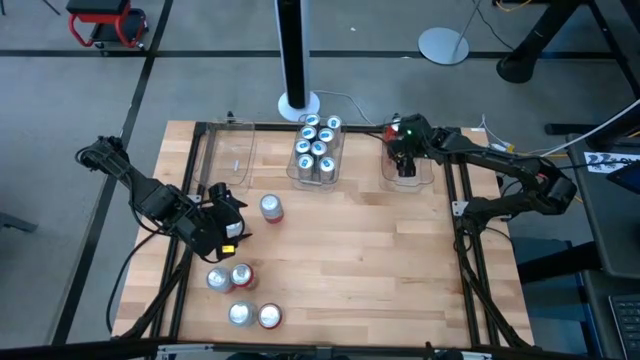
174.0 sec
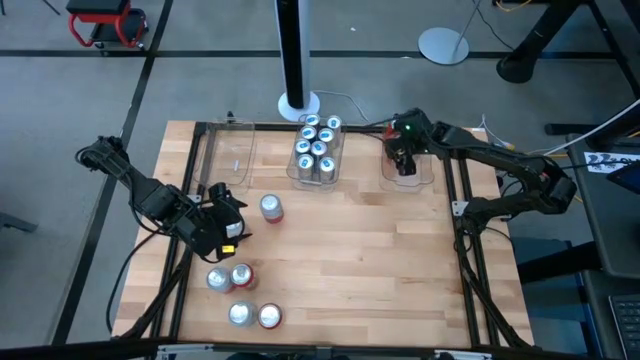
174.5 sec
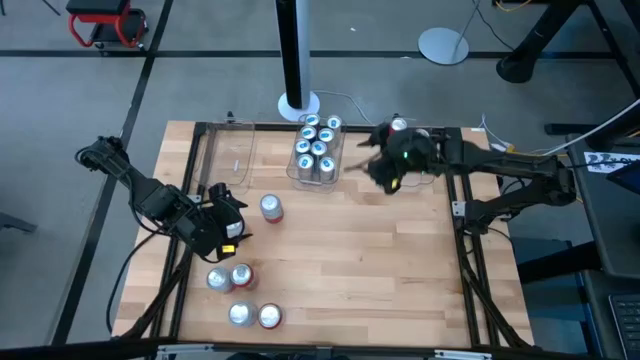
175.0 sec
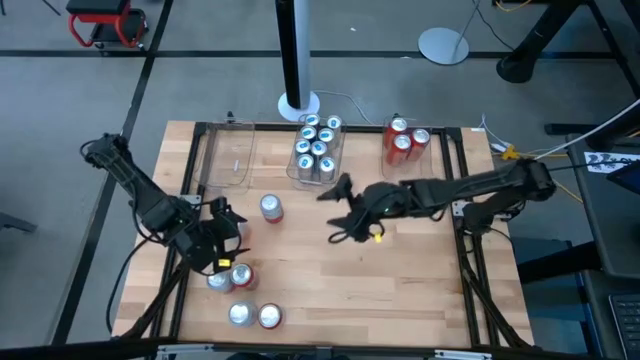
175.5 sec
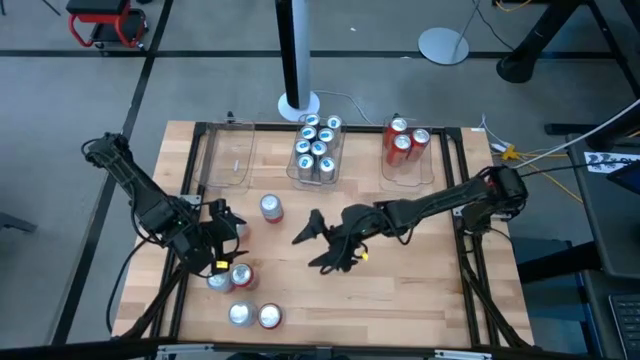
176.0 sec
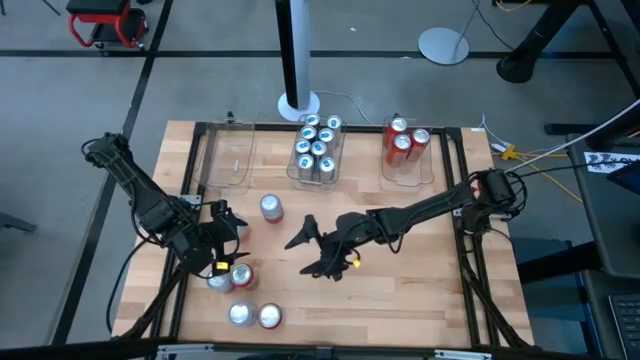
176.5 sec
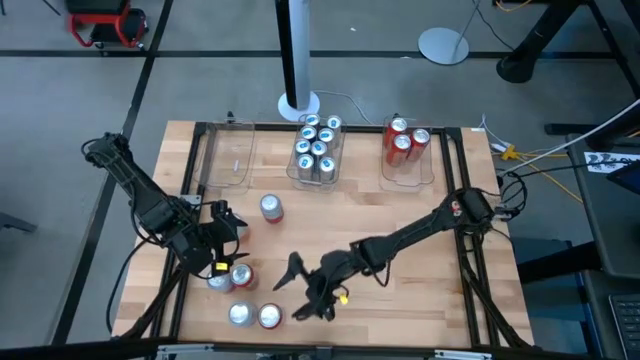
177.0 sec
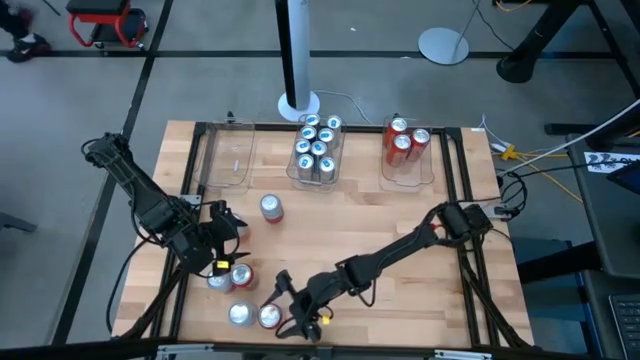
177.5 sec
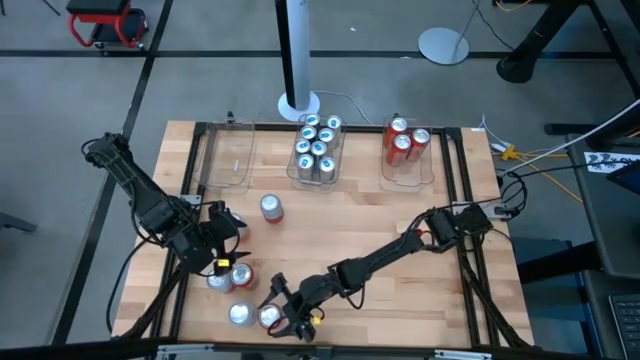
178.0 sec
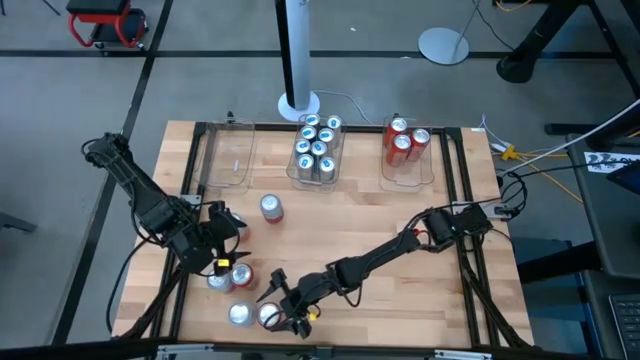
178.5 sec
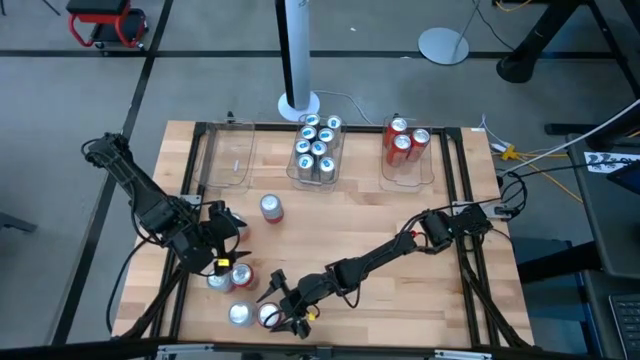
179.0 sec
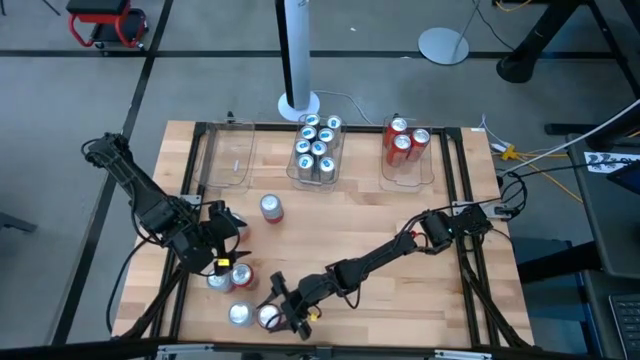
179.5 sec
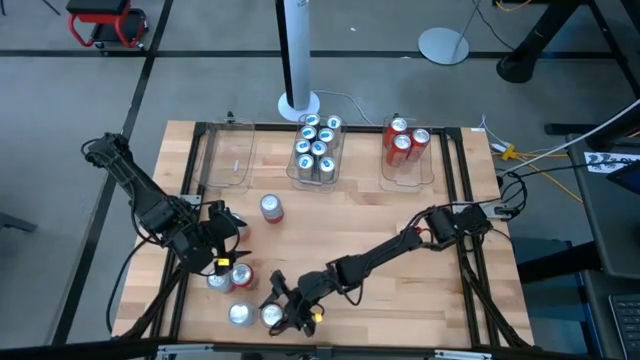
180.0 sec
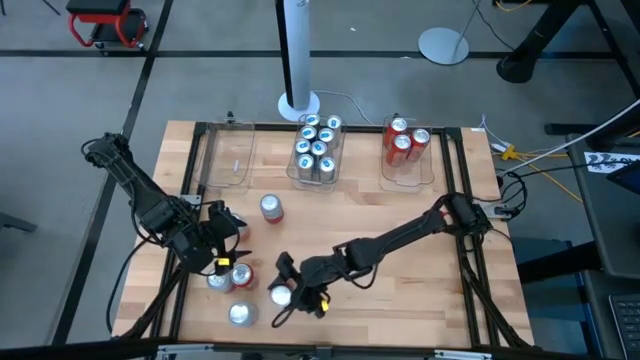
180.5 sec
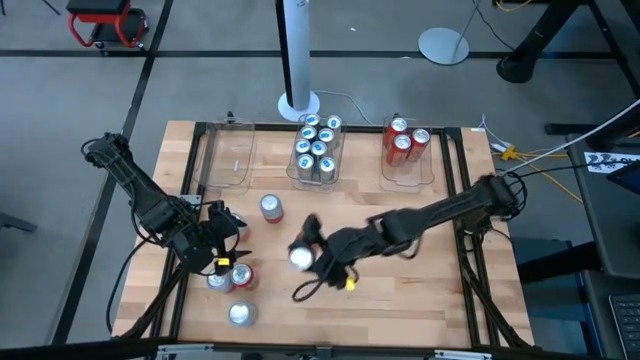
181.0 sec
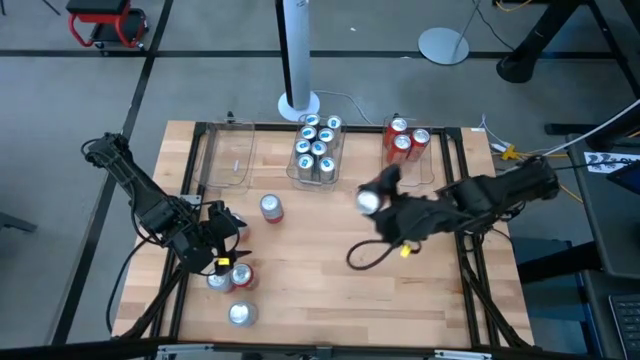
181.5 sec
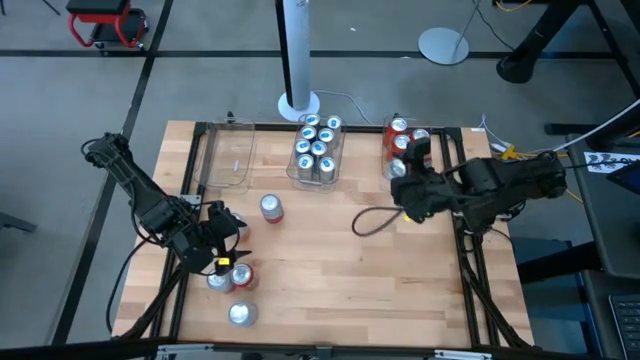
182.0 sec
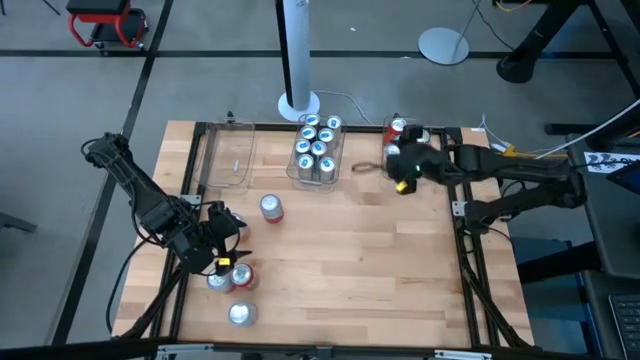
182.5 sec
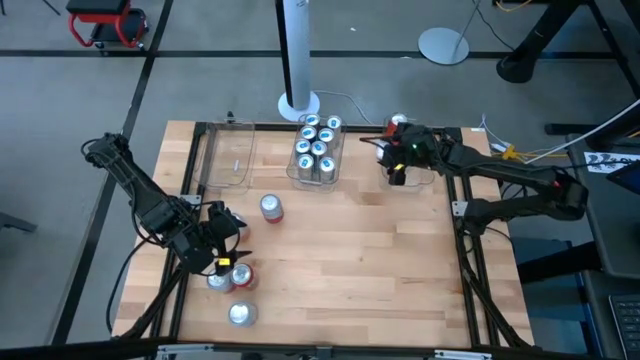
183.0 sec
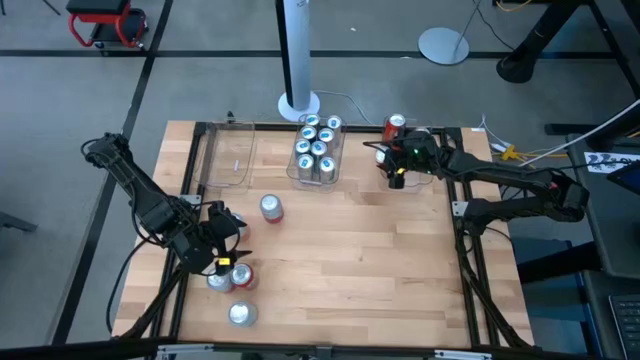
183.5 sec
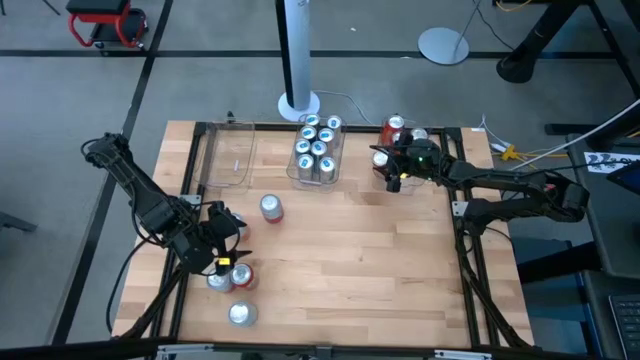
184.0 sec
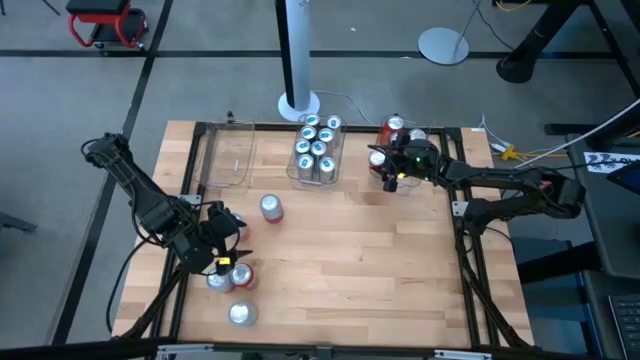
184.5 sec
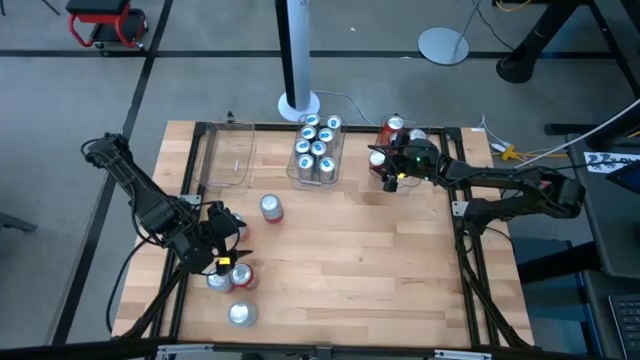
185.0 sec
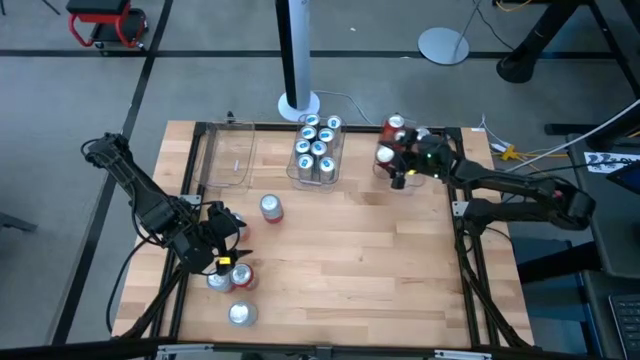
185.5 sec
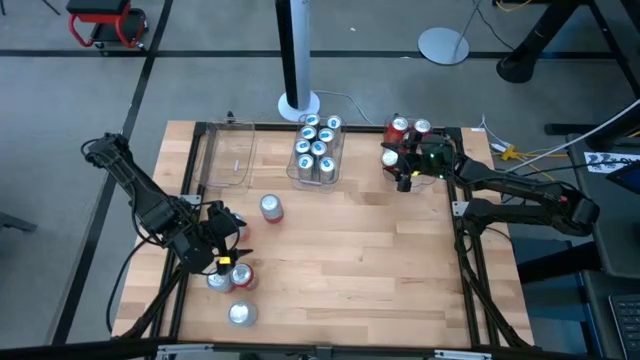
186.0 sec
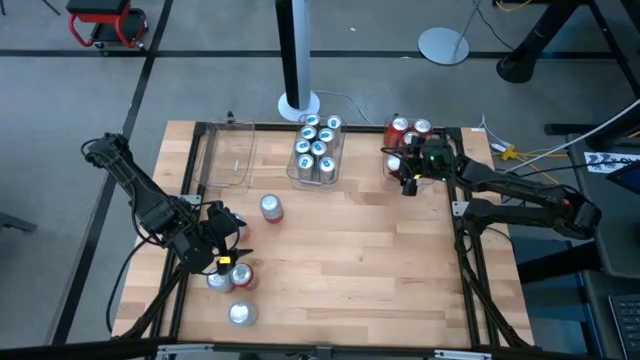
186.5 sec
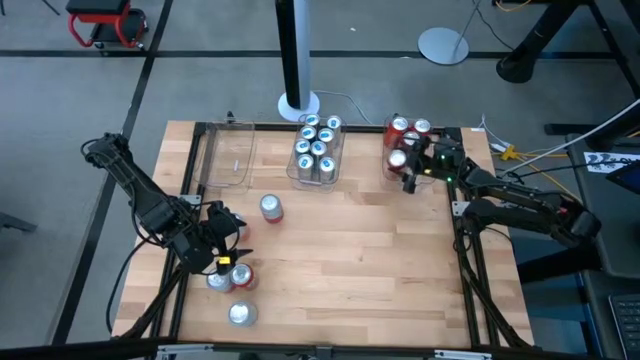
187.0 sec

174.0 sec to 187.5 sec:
Task: Sort soda cans
Put the orange soda can into the right transparent bin

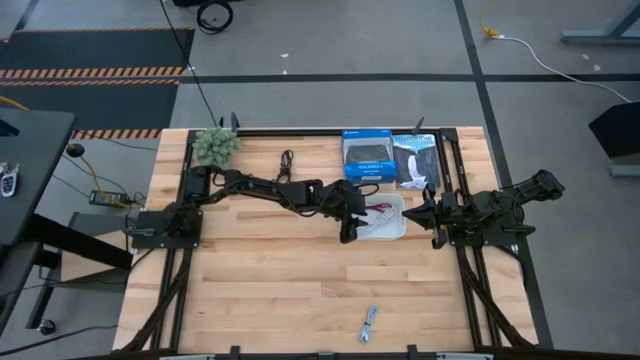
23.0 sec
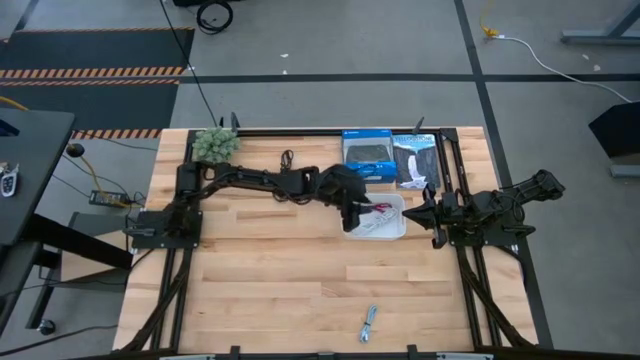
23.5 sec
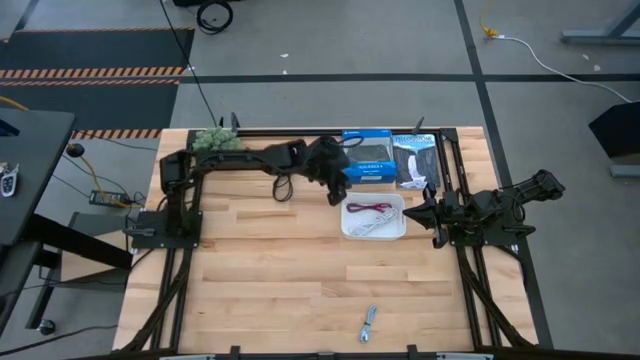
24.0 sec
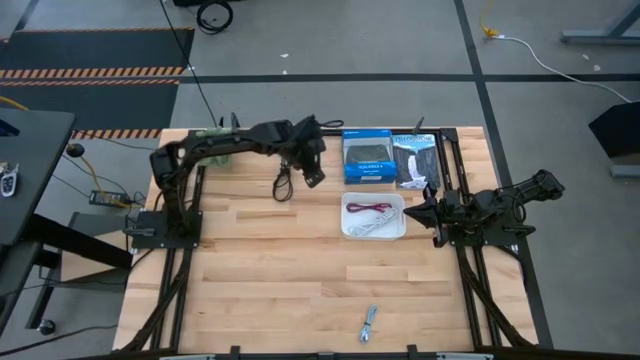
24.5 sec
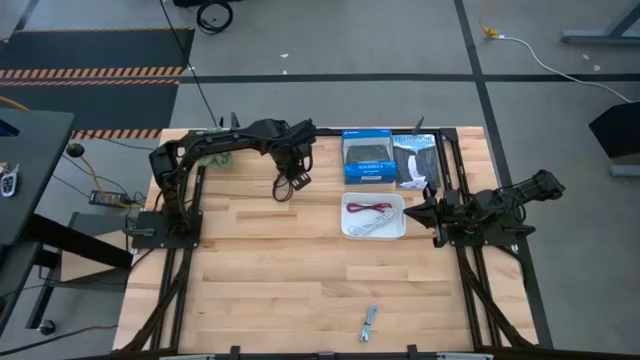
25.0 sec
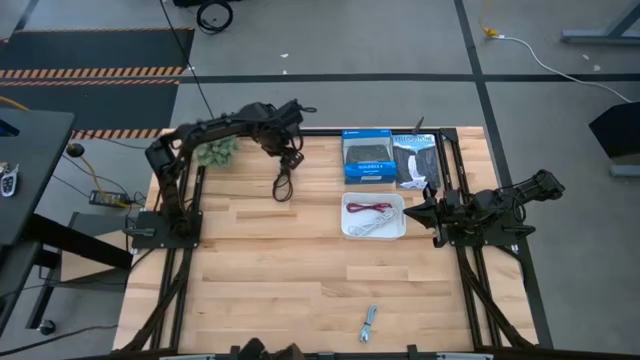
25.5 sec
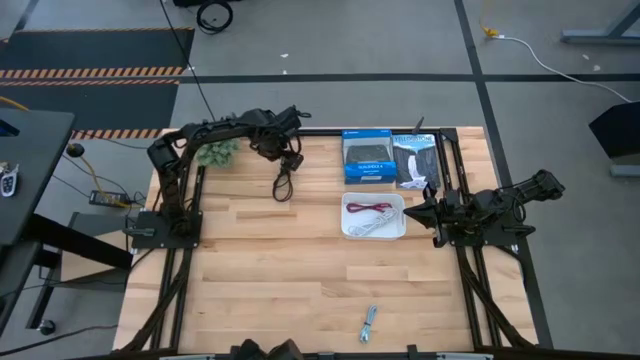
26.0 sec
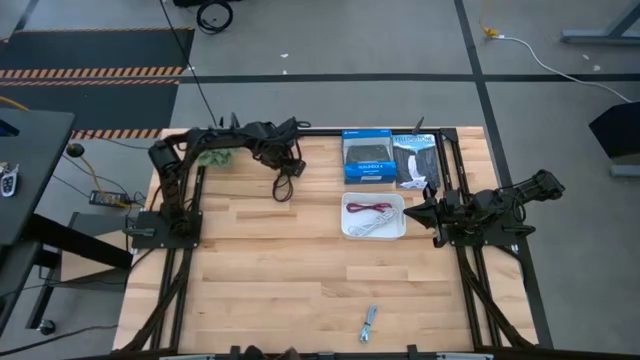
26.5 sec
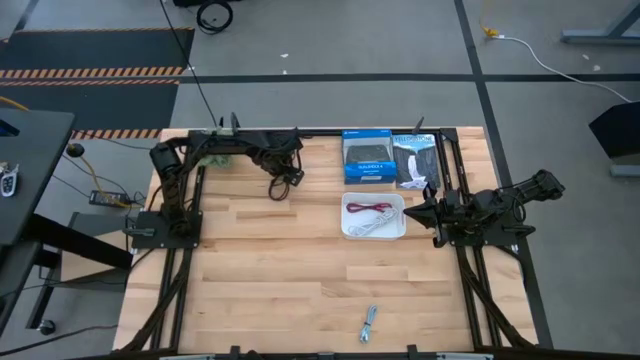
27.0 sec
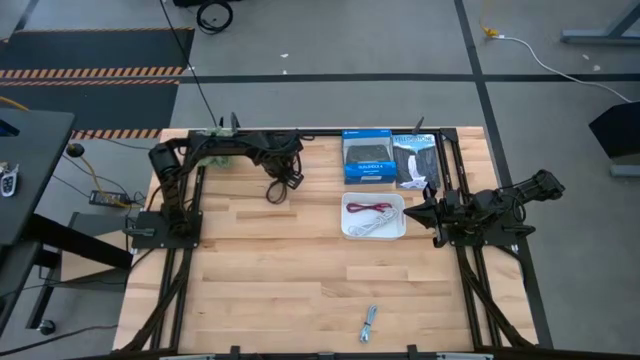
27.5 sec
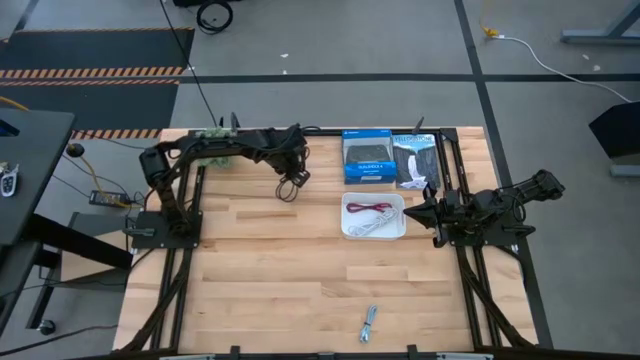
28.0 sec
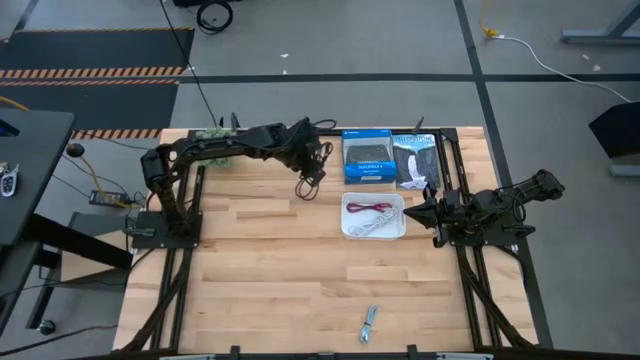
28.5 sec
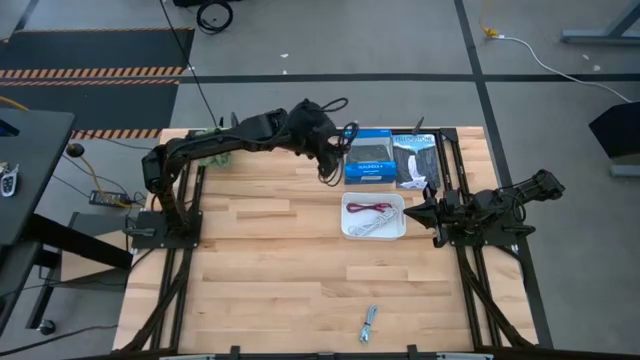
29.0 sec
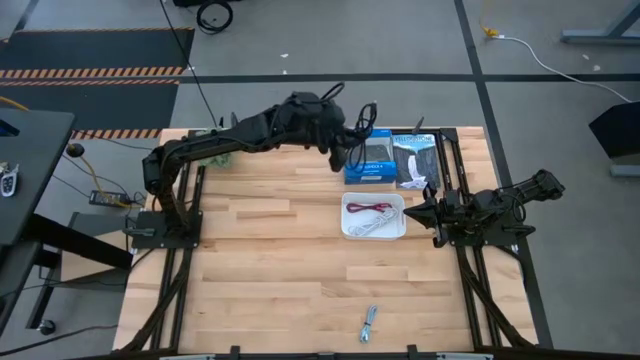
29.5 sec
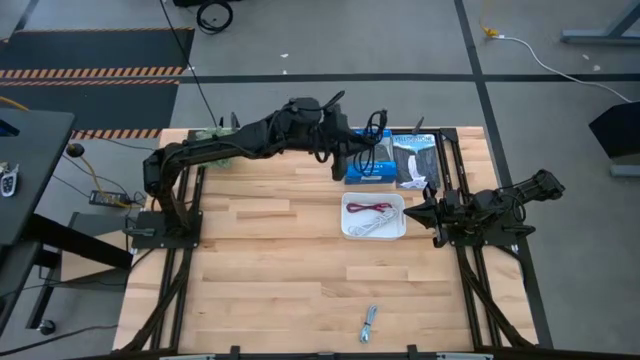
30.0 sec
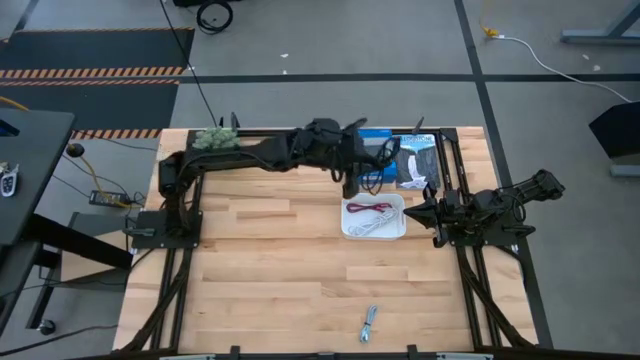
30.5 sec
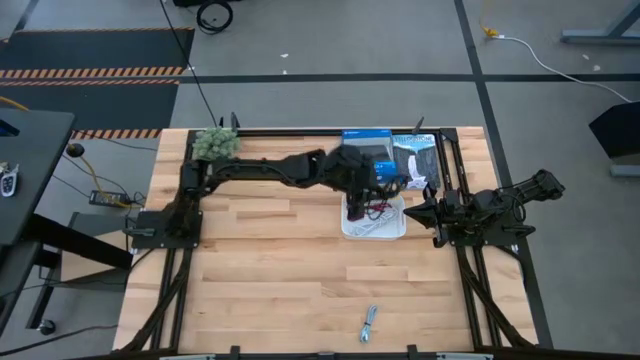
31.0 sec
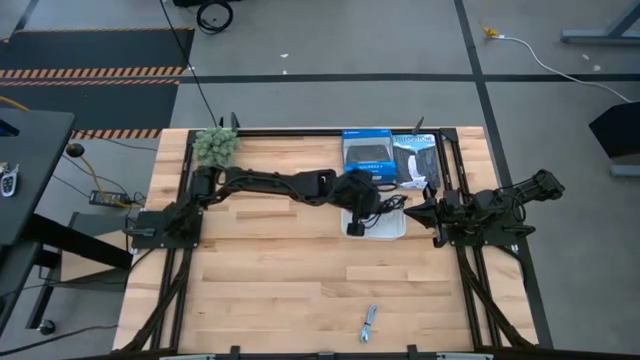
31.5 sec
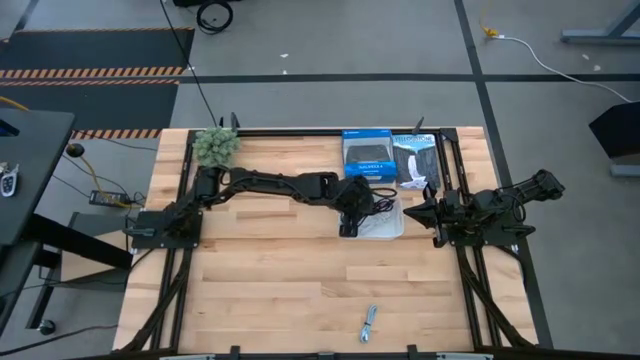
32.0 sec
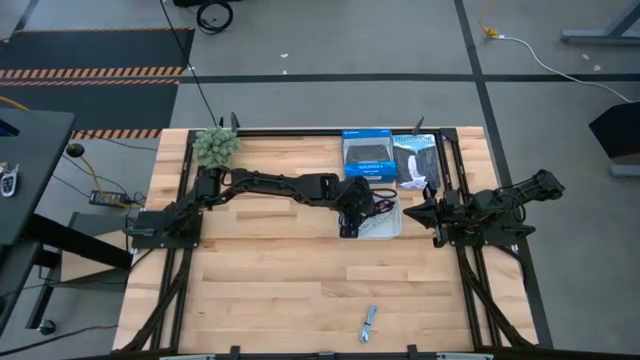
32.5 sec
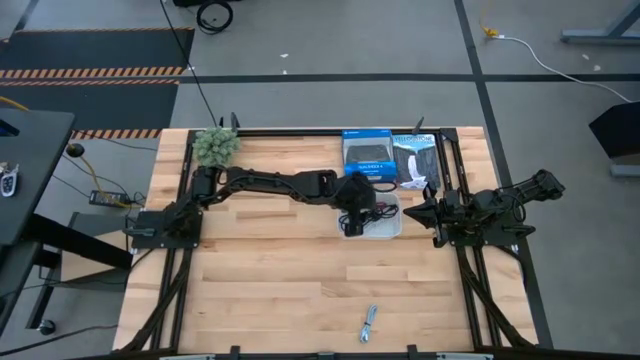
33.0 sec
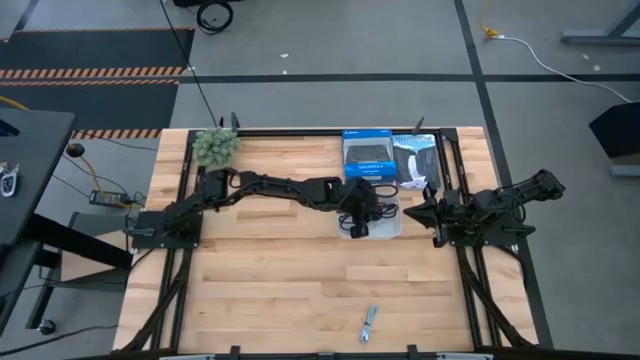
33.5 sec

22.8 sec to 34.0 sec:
Task: Pick and place USB-C Cables
Put the black charger cable into the white bin
